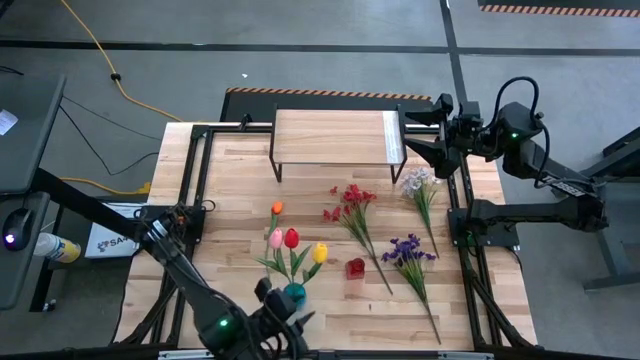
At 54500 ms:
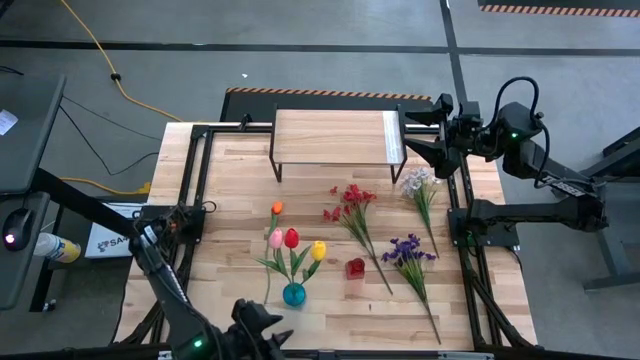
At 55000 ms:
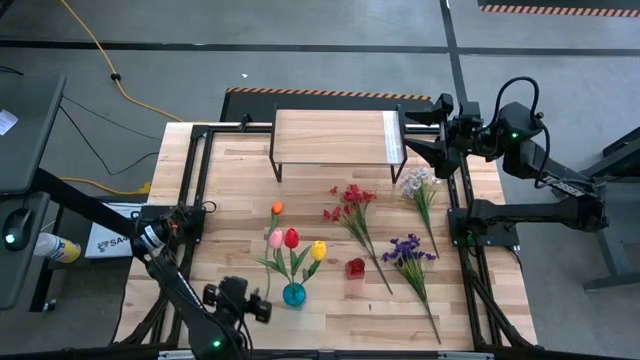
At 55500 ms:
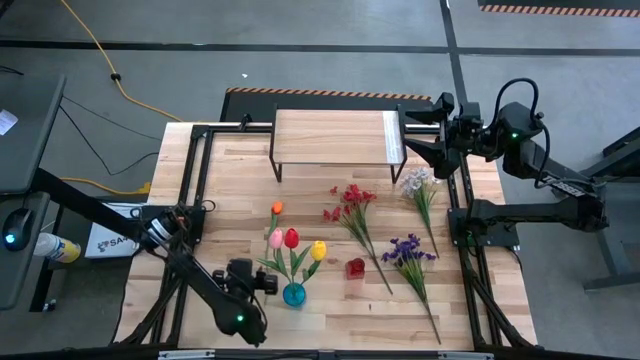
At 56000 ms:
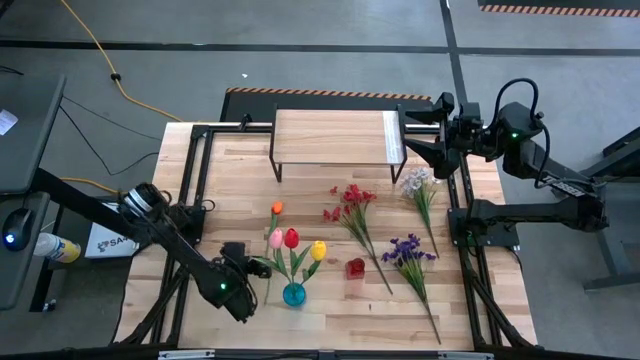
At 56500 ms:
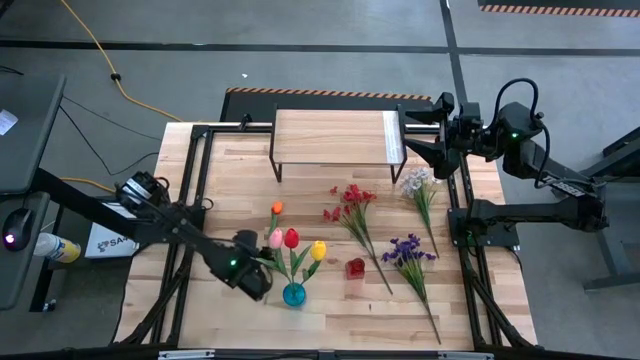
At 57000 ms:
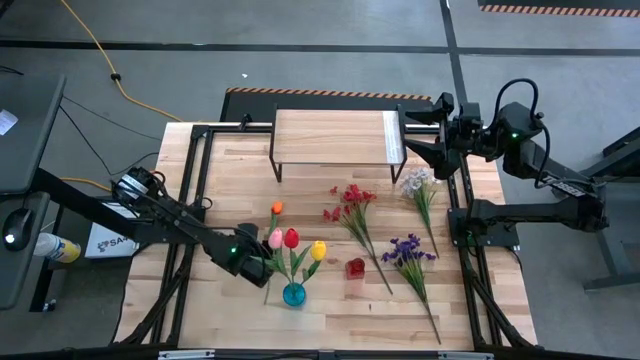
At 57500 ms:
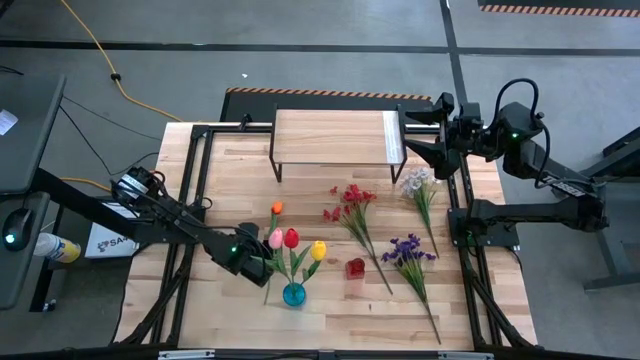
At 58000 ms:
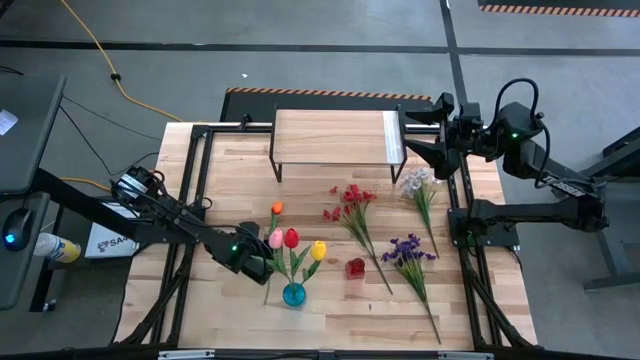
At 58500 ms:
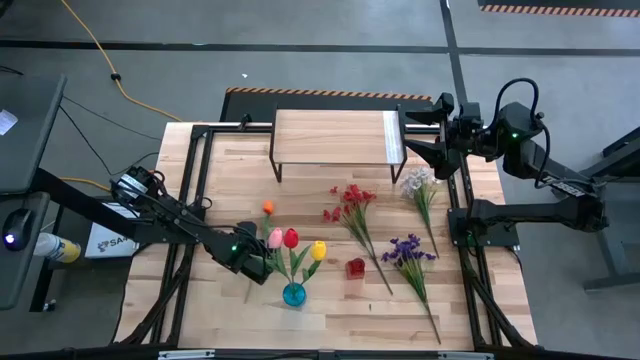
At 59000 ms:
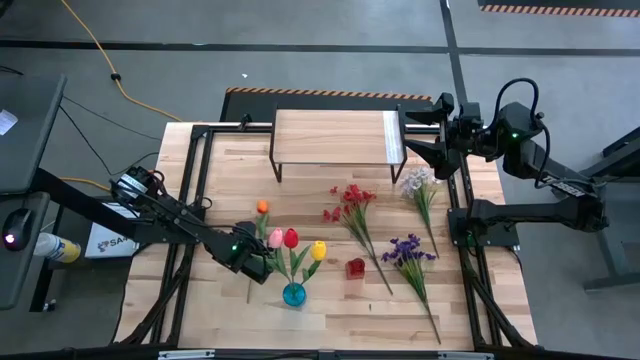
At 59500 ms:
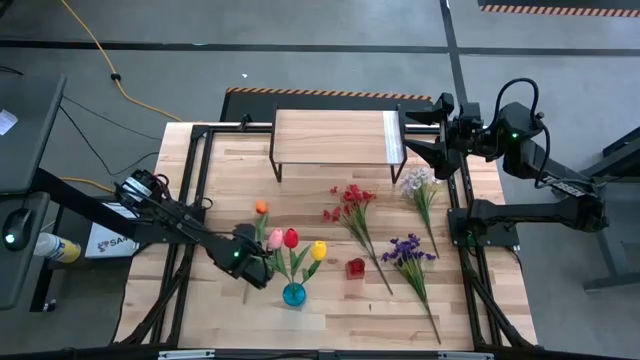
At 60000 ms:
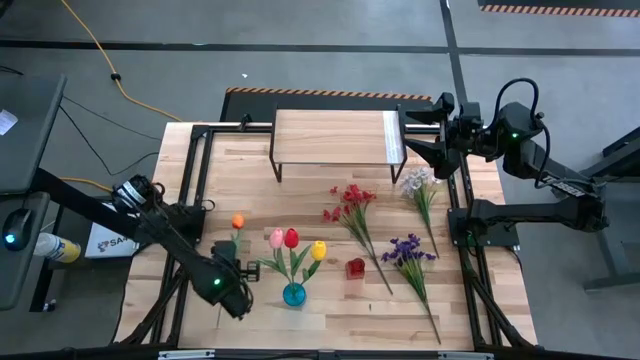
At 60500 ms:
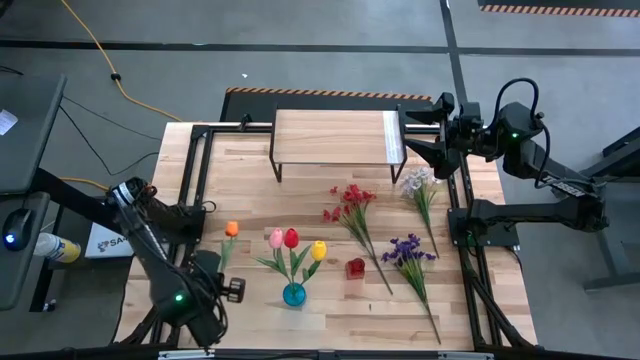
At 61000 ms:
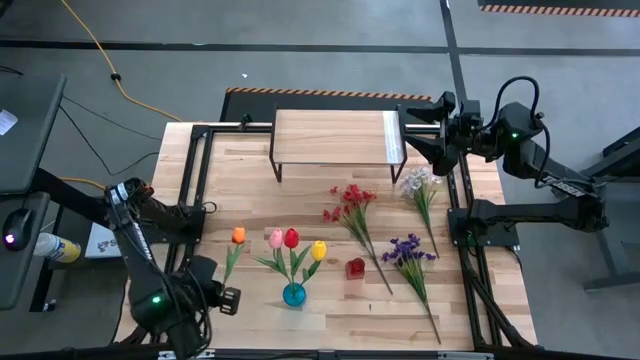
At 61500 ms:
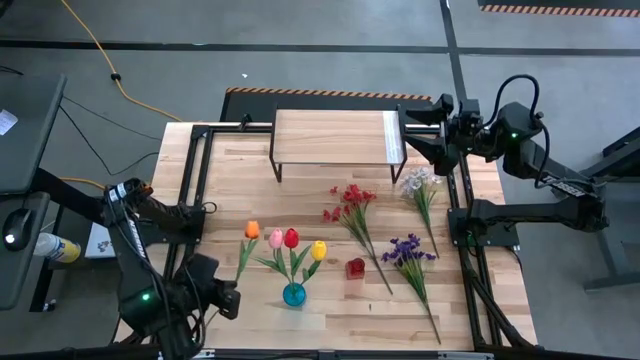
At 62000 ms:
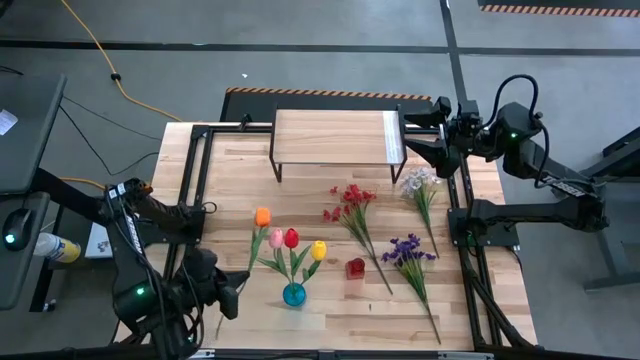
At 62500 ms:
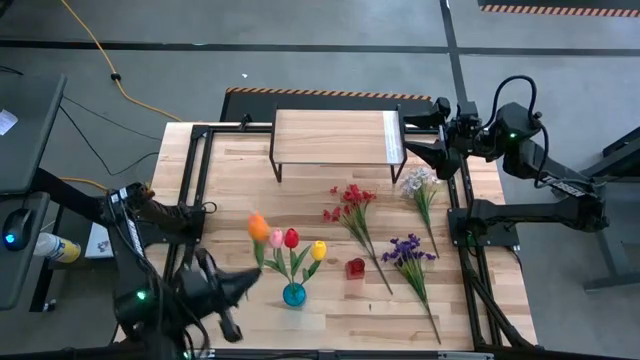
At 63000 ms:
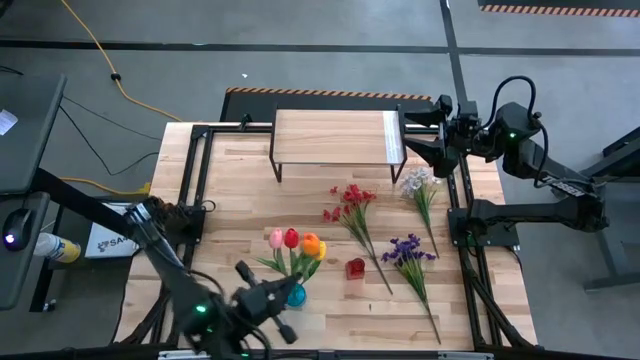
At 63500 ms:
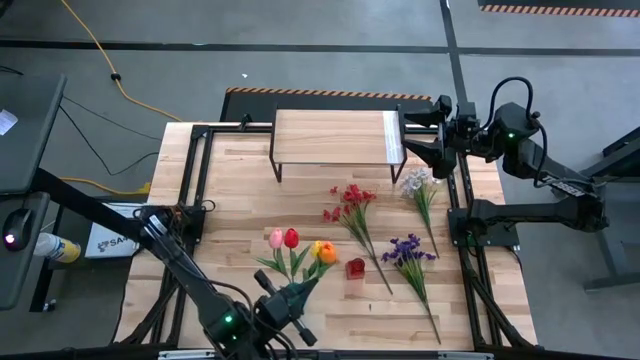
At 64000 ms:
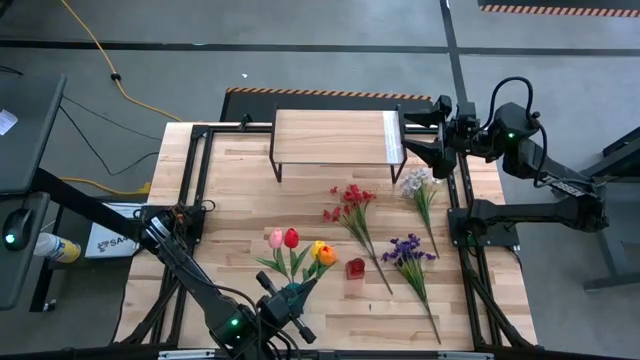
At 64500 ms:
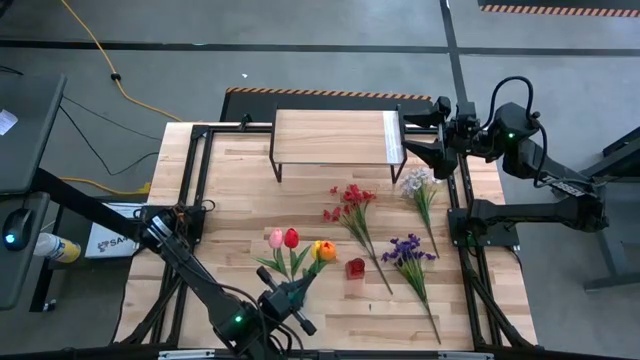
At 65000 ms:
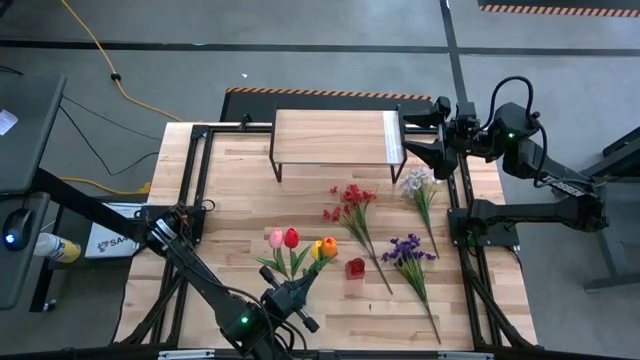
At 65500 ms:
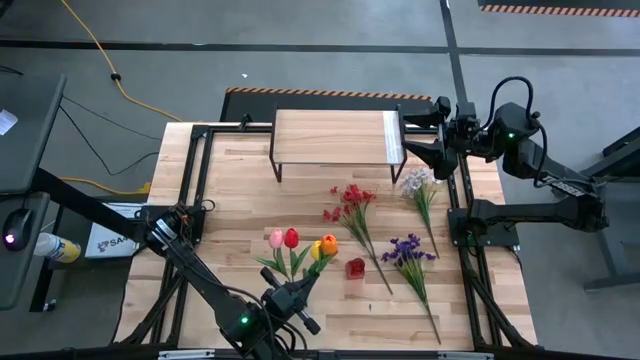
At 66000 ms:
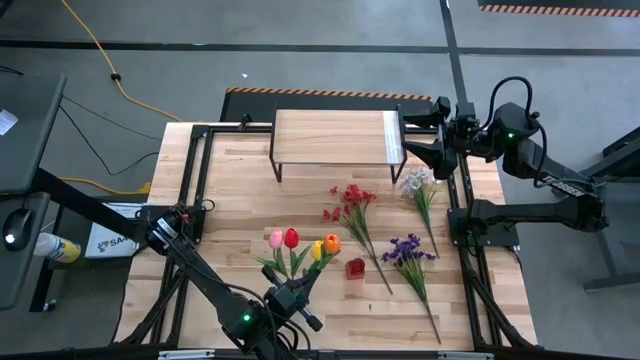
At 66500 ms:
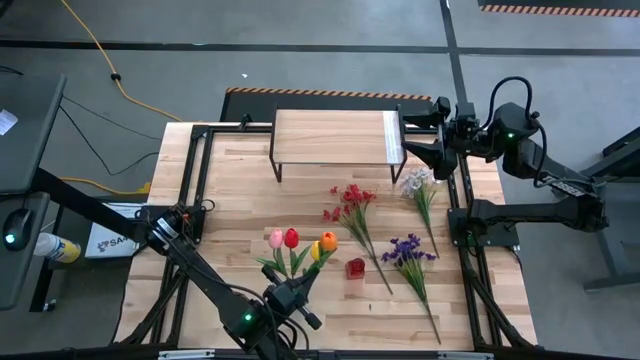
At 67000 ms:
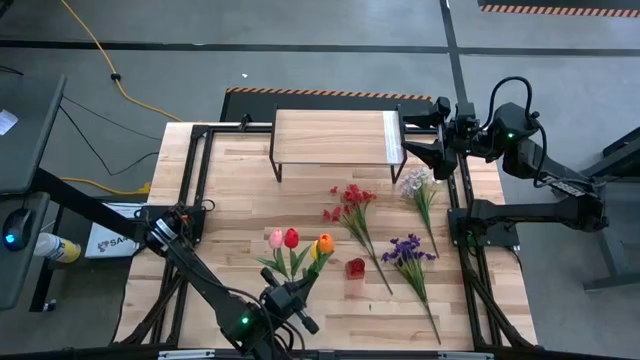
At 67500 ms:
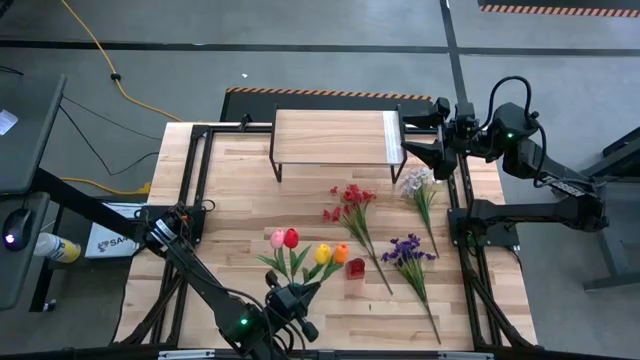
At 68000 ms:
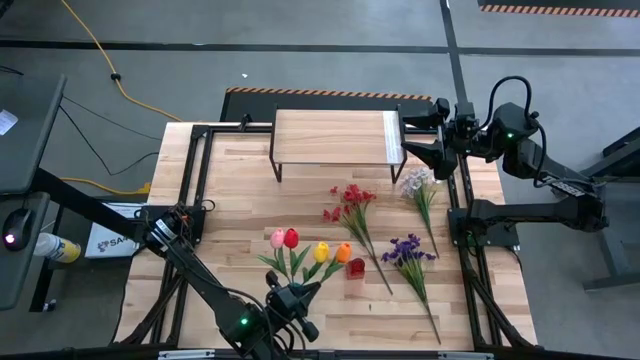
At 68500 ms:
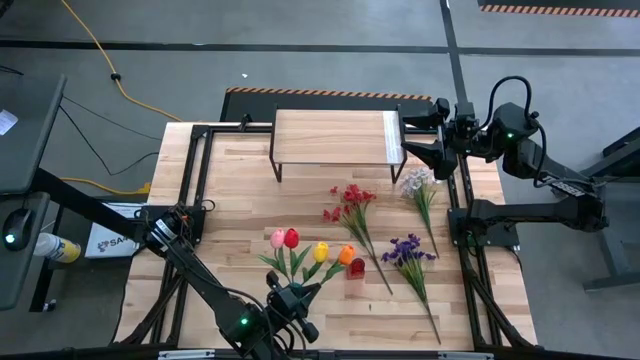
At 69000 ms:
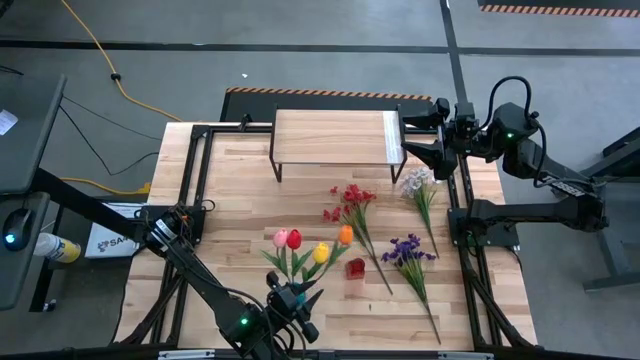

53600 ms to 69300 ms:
Task: Pick and place flowers into a vace then onto a shelf
Put the orange tulip into the blue transparent vase

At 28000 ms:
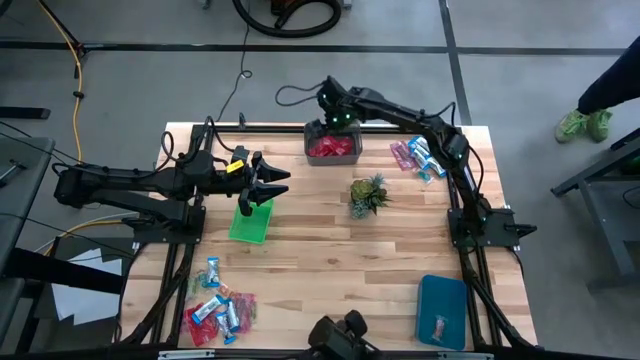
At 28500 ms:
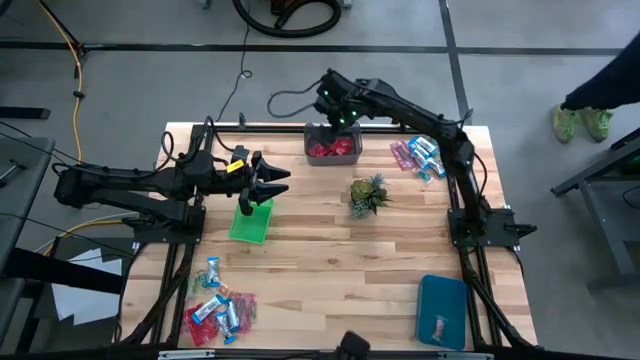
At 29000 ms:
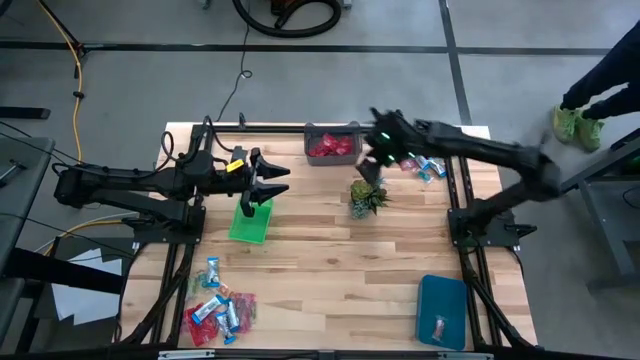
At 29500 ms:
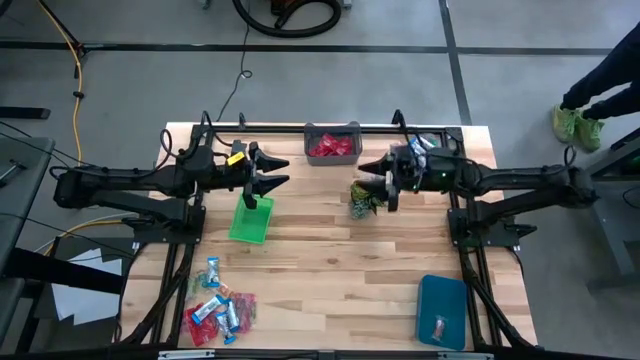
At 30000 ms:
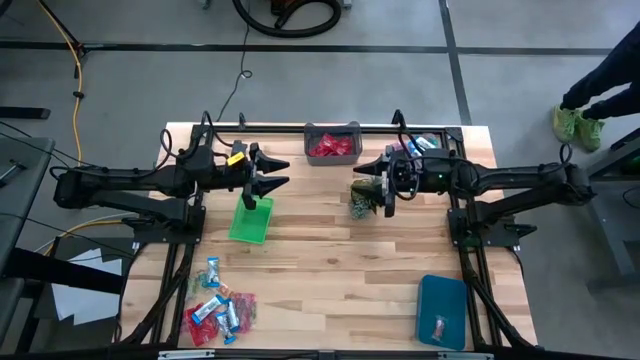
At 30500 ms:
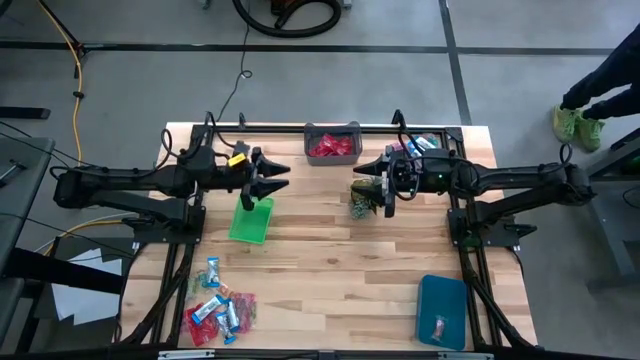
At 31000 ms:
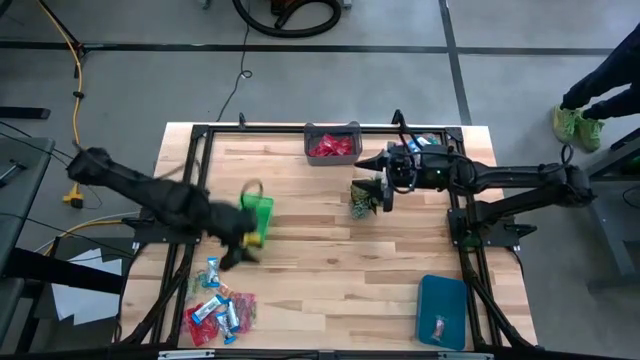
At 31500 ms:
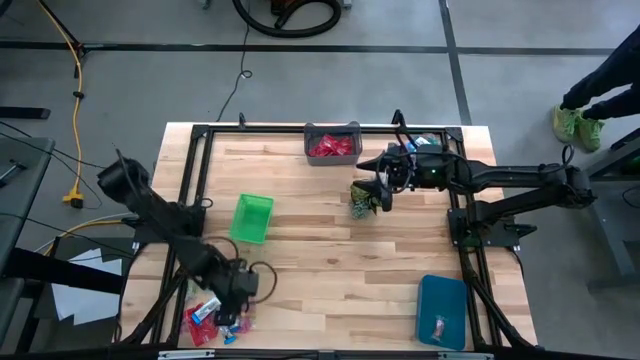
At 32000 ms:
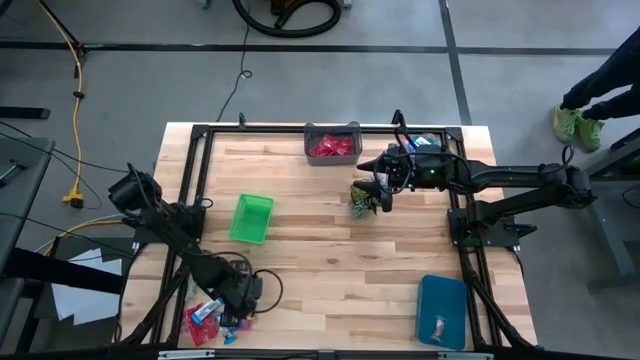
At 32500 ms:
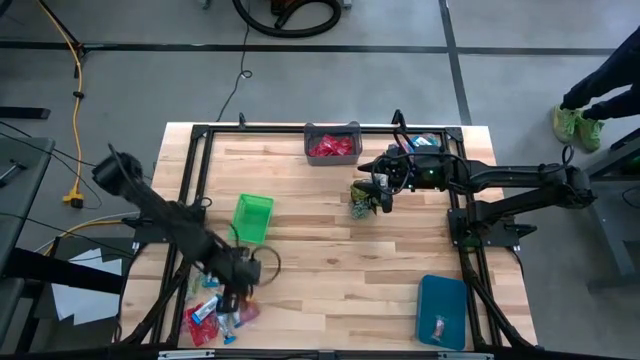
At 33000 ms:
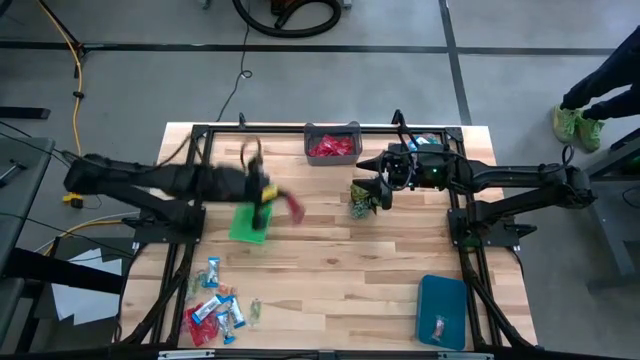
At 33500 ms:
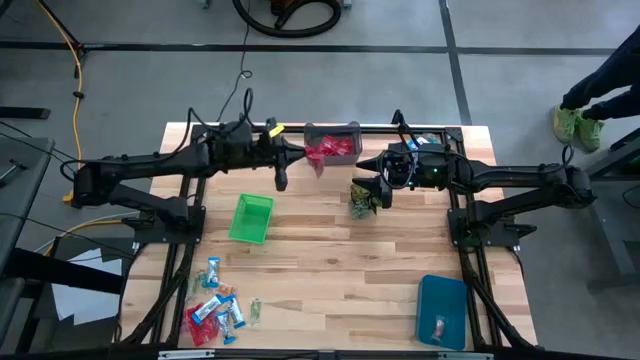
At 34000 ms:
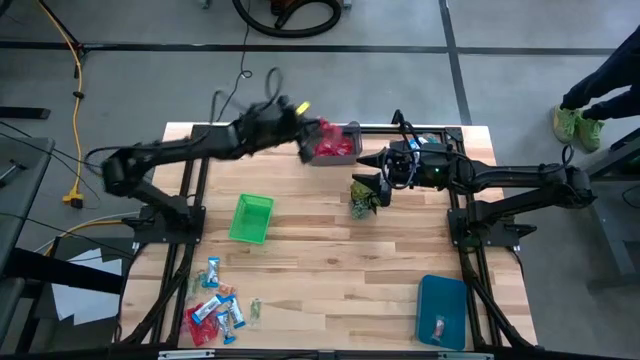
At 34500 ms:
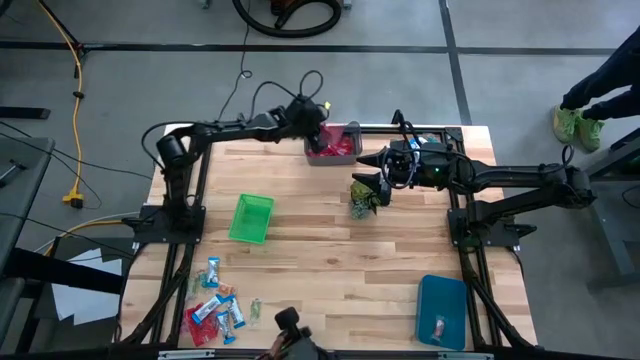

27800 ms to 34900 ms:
Task: Sort candy
Put the red candy into the black transparent bin
